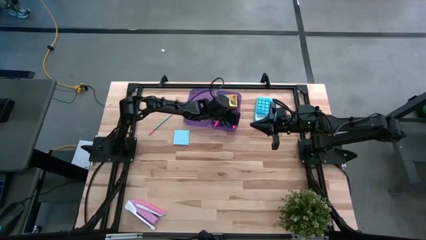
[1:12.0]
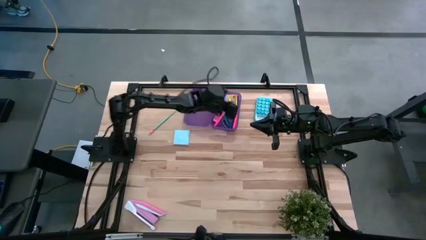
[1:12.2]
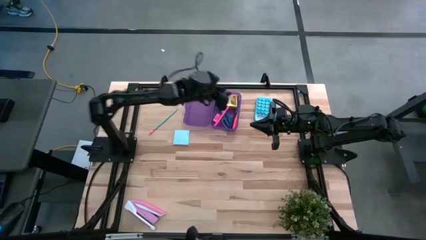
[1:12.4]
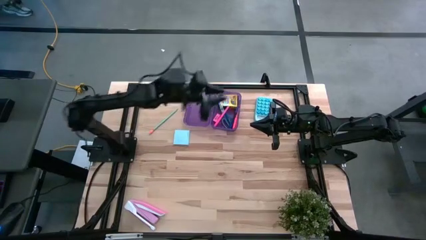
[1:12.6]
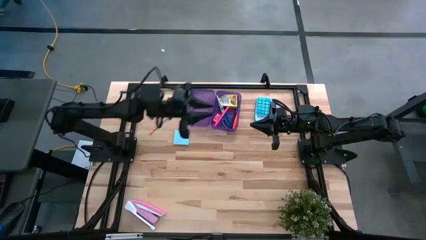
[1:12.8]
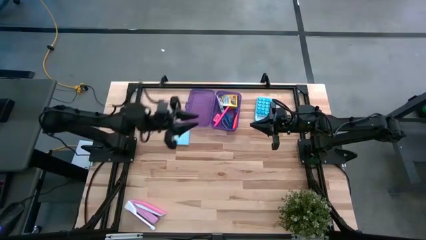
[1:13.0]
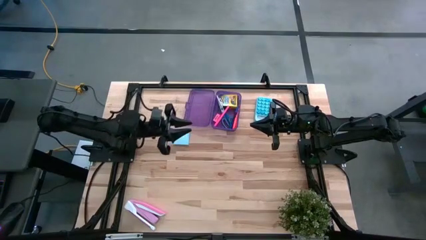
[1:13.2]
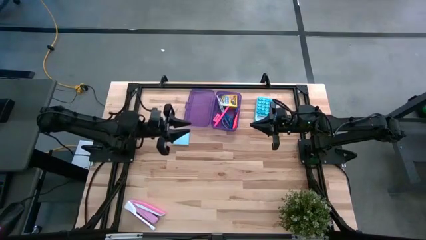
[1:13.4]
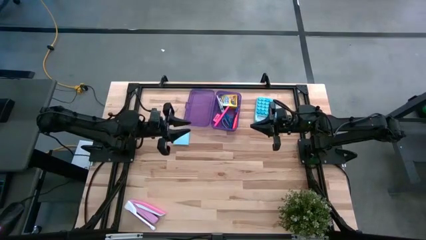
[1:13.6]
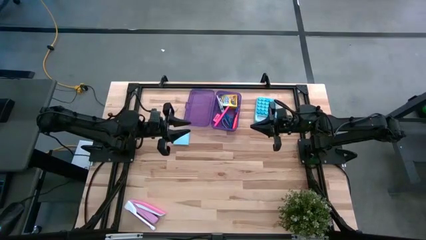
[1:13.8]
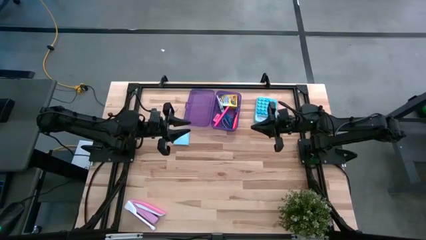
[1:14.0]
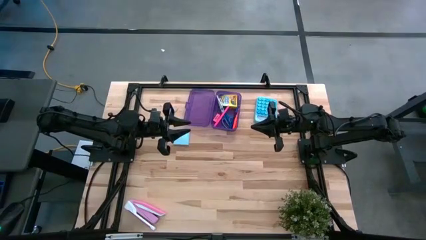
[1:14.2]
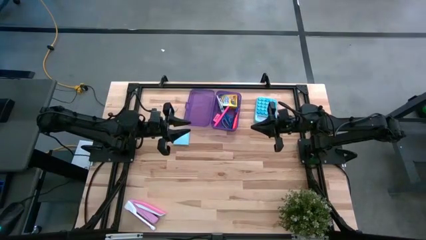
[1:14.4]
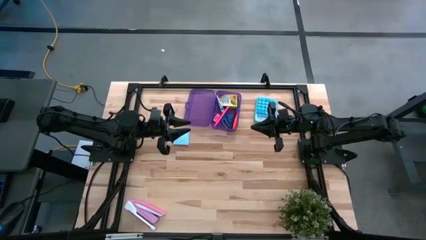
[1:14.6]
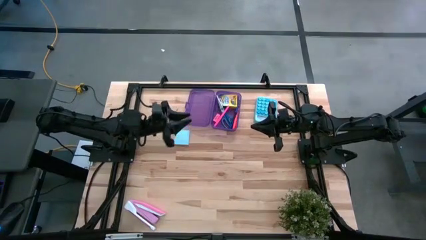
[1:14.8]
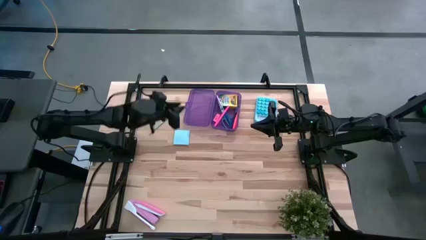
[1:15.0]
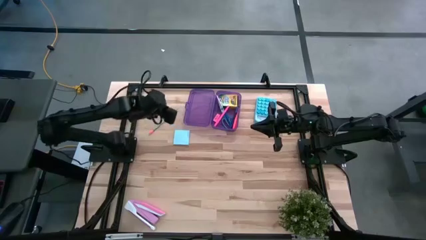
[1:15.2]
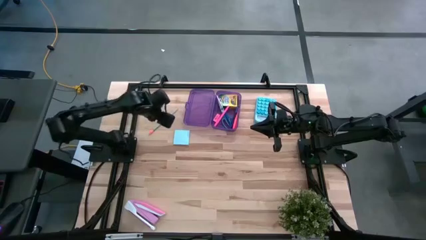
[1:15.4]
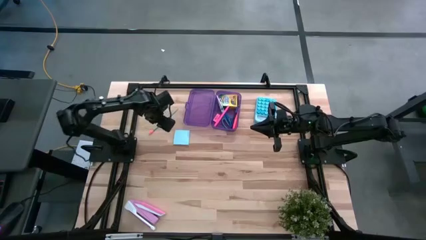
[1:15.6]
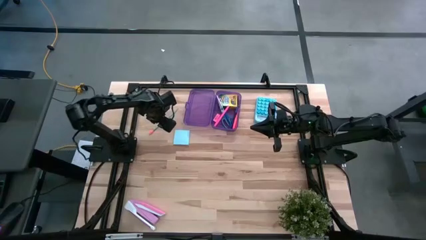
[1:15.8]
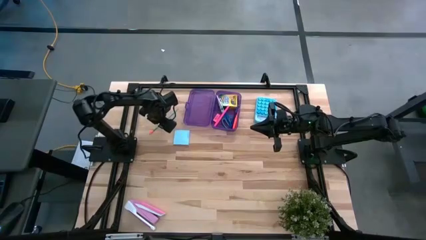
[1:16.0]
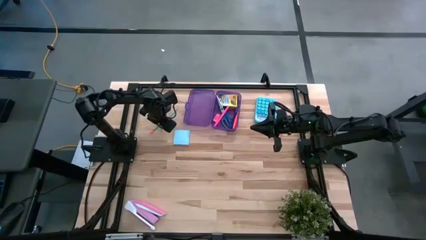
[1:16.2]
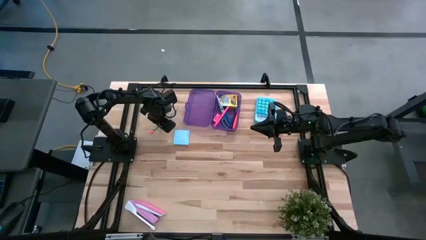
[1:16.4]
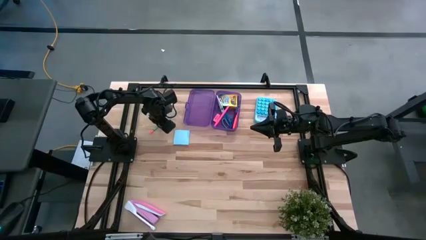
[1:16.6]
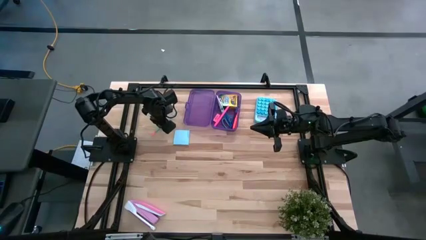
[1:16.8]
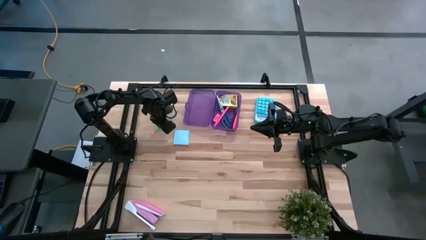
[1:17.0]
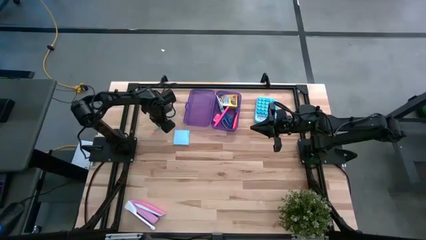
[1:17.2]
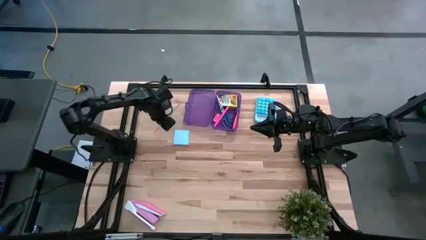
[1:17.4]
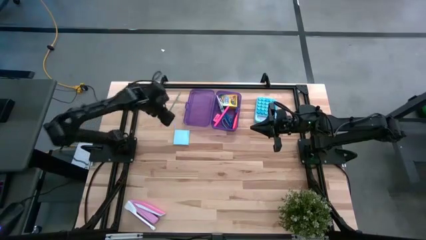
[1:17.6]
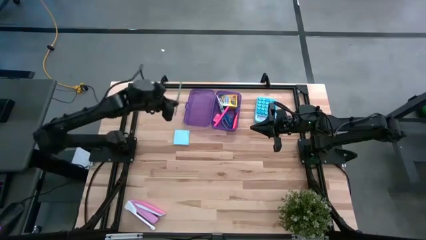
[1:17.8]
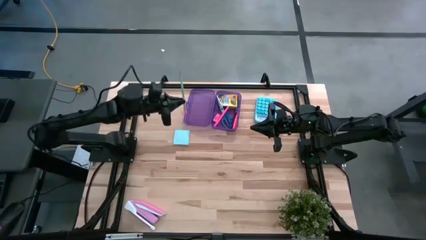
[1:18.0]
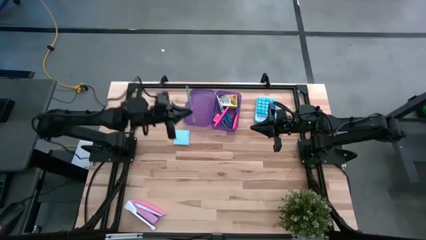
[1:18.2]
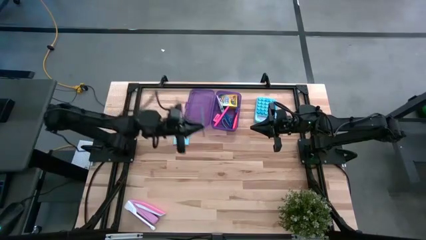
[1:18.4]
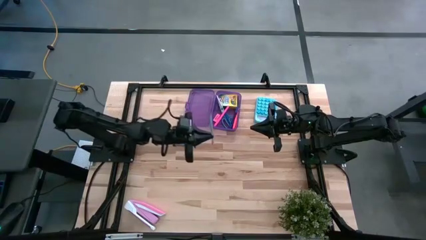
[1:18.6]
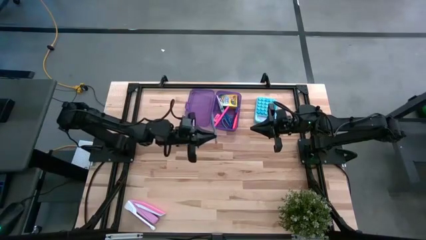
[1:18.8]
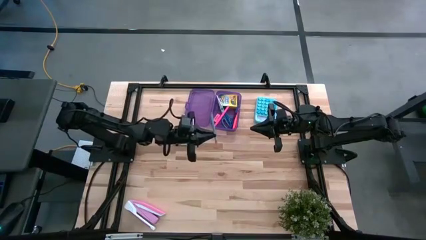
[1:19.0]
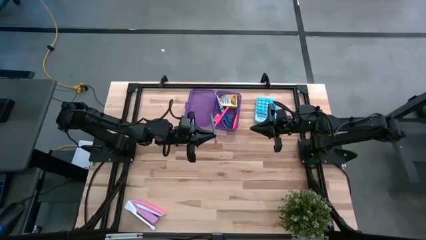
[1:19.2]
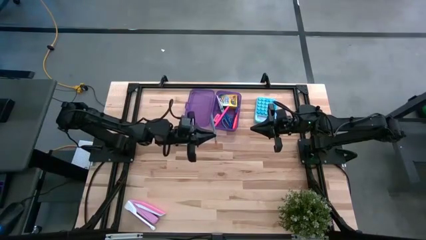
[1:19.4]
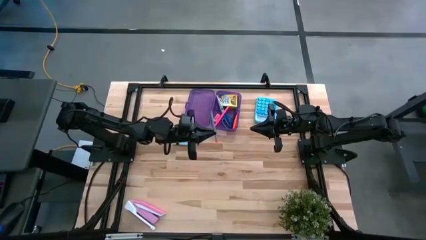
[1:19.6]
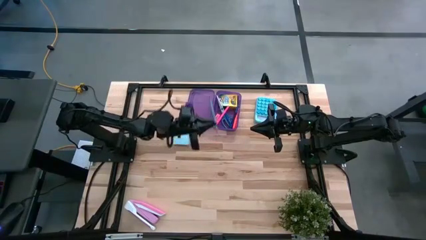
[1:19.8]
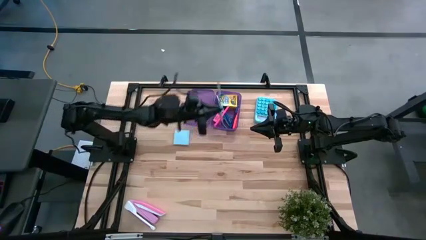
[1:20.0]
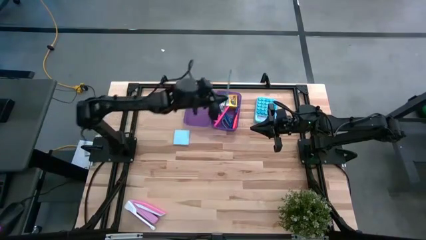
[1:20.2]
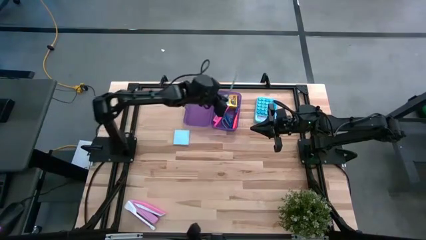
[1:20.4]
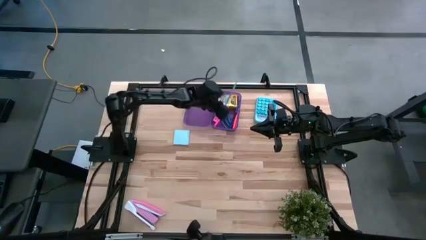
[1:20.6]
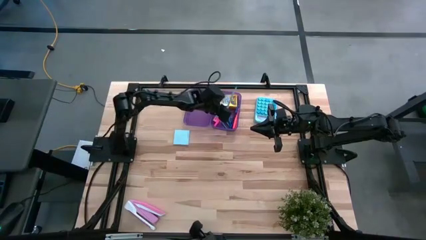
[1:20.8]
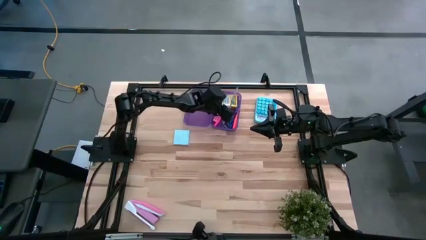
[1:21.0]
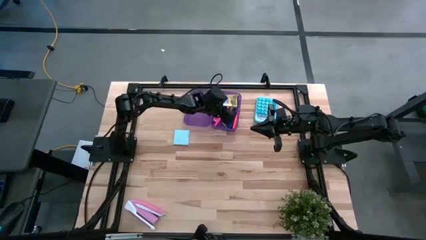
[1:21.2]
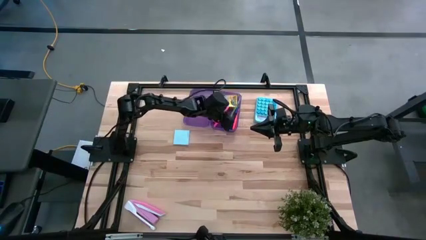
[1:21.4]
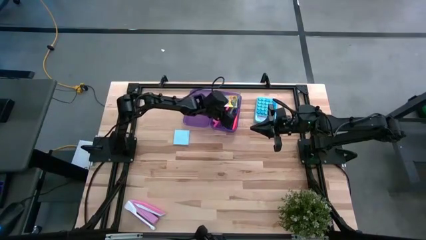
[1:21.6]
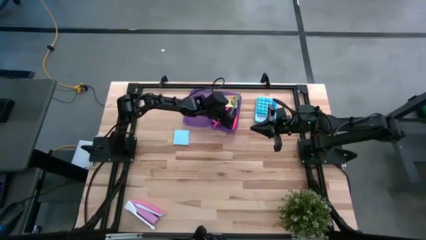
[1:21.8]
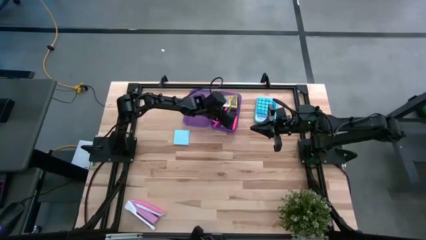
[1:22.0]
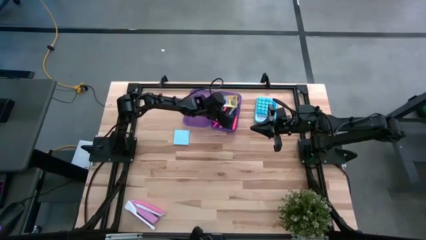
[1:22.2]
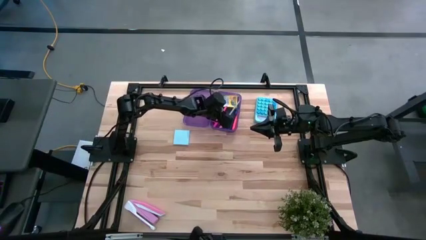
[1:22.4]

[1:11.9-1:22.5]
Task: Pack school essentials
Put the blue pencil into the purple supply box

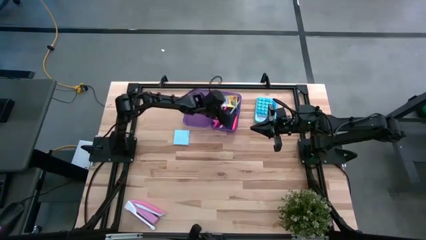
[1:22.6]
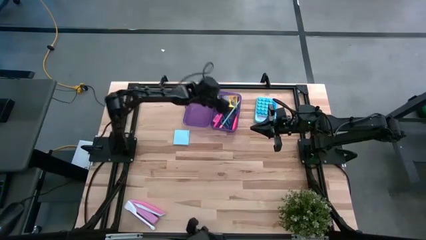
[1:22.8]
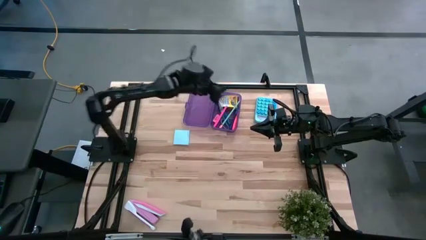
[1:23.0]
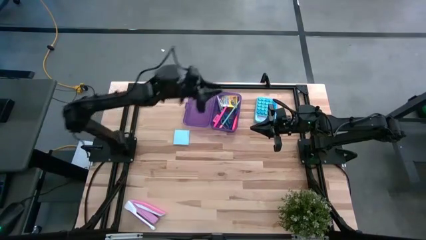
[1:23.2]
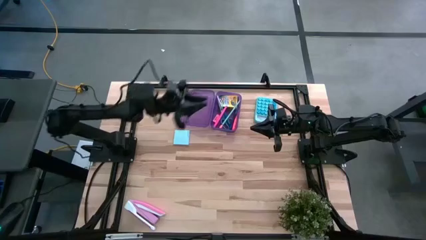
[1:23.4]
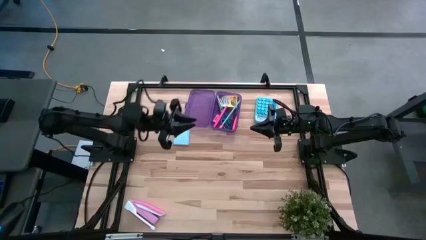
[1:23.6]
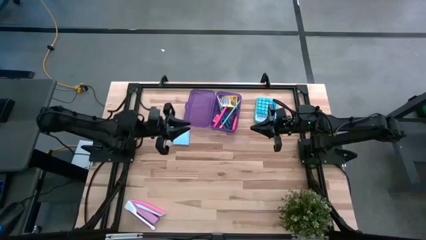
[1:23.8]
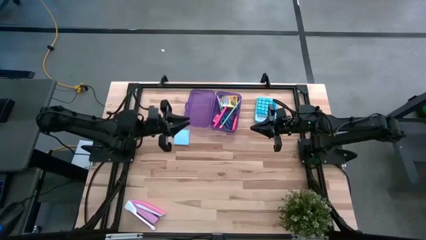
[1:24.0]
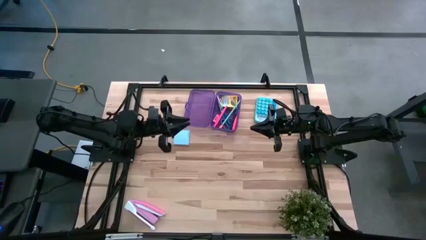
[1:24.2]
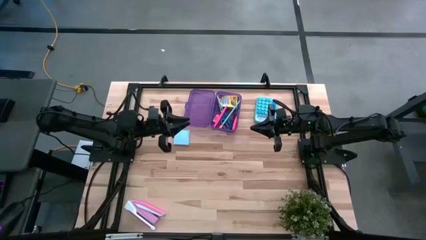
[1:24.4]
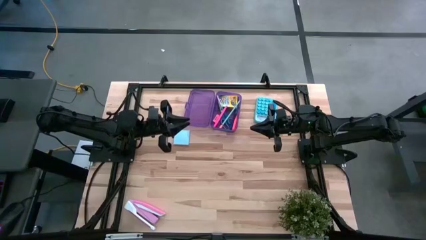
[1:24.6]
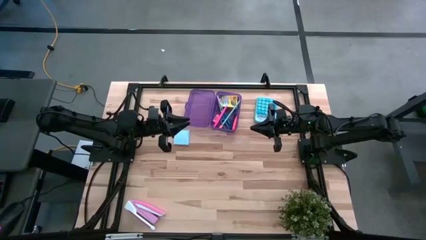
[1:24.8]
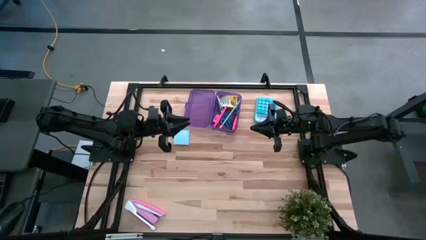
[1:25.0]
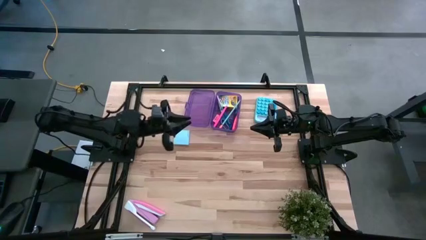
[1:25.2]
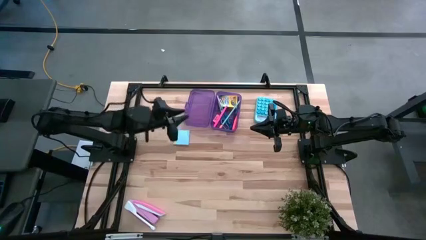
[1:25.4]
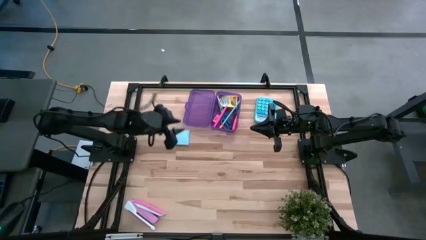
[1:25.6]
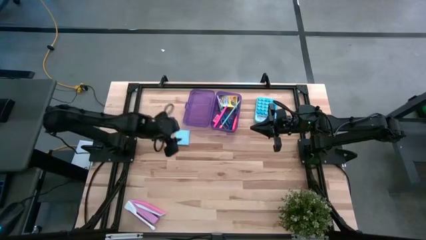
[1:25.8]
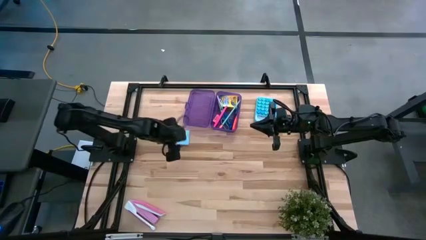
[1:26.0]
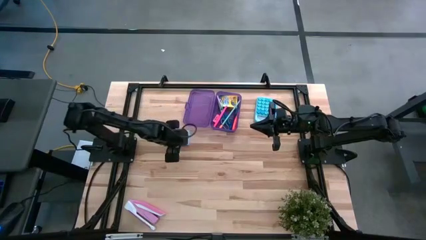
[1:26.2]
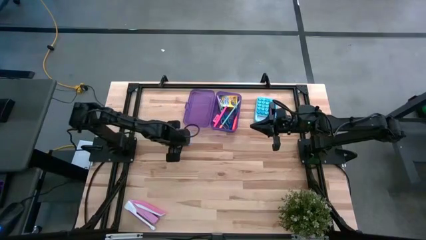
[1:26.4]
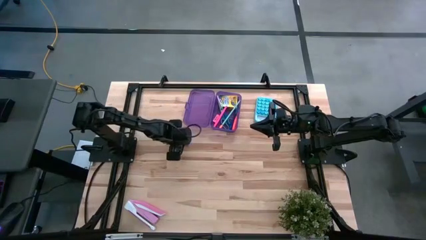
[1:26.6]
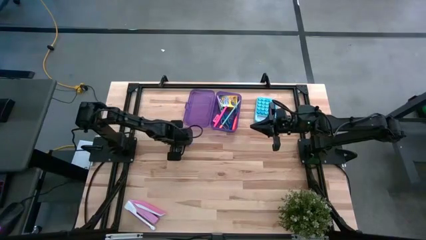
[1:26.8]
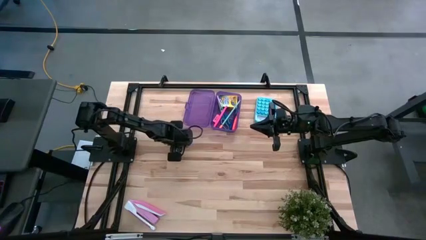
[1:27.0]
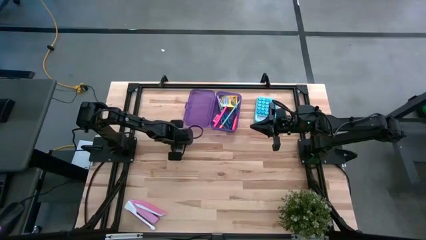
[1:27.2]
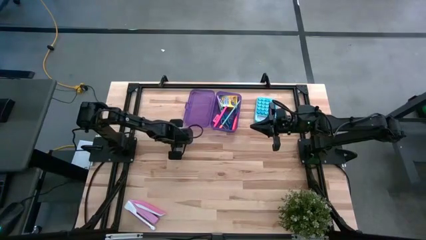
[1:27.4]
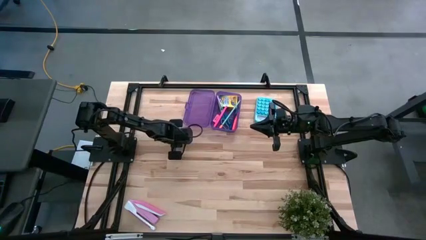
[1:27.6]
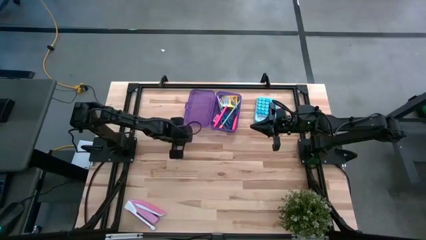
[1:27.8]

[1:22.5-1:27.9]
Put the blue sticky note into the purple supply box
